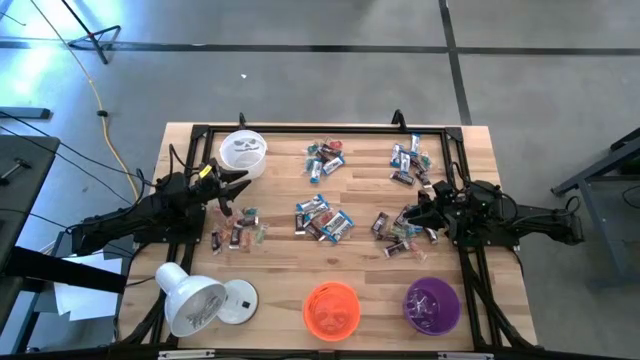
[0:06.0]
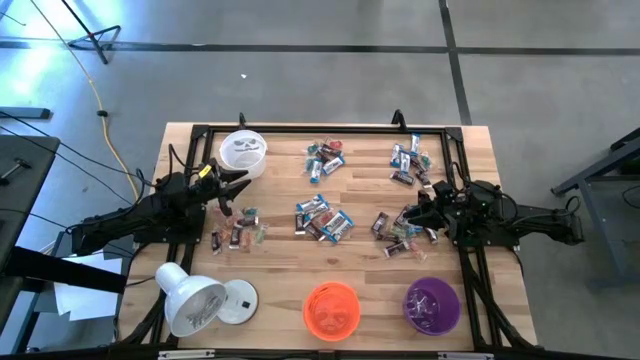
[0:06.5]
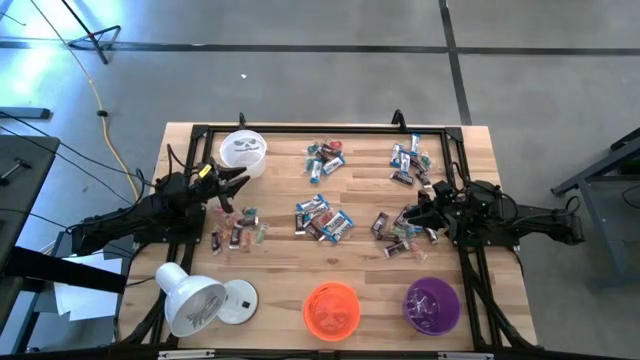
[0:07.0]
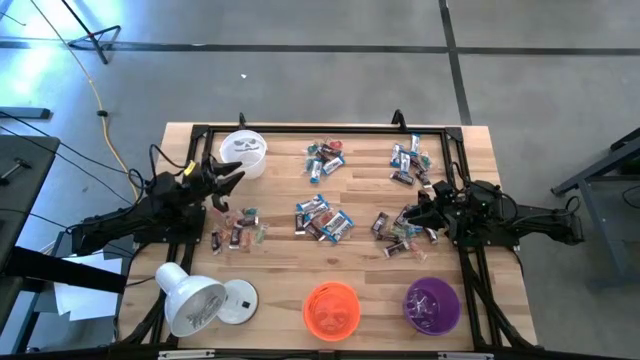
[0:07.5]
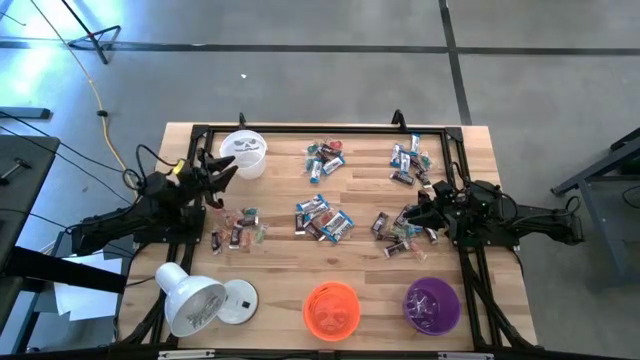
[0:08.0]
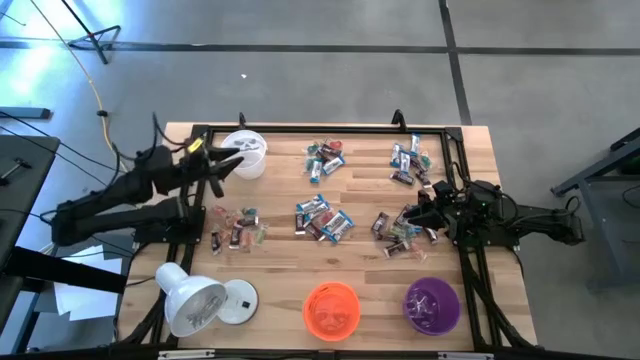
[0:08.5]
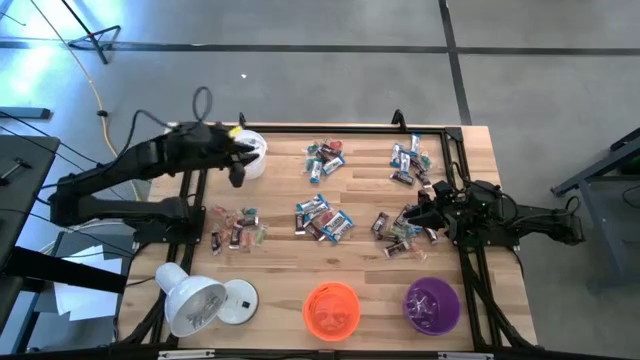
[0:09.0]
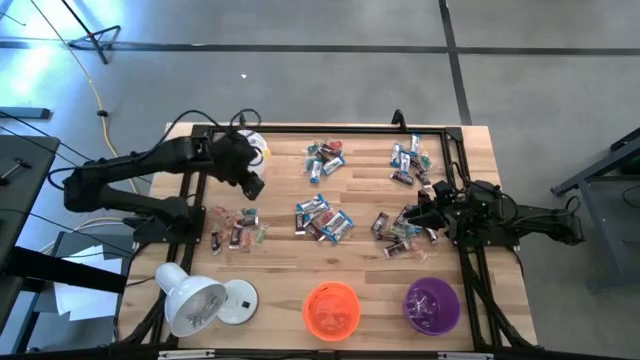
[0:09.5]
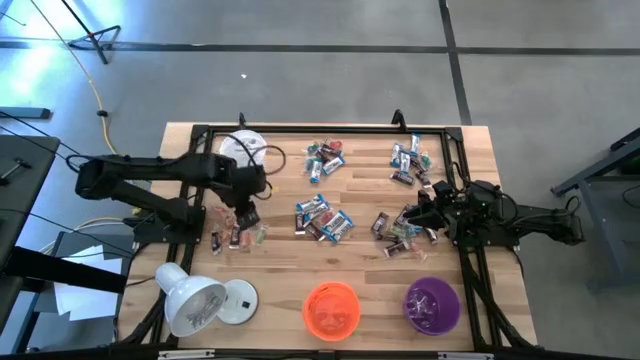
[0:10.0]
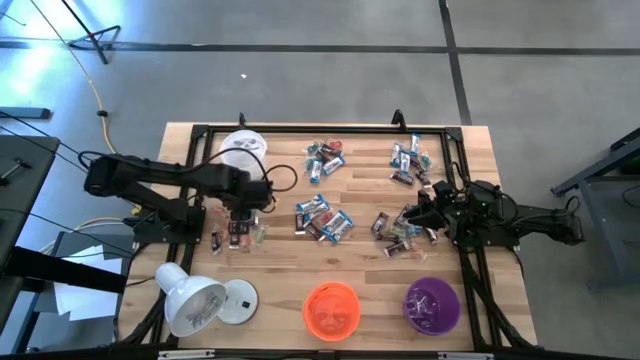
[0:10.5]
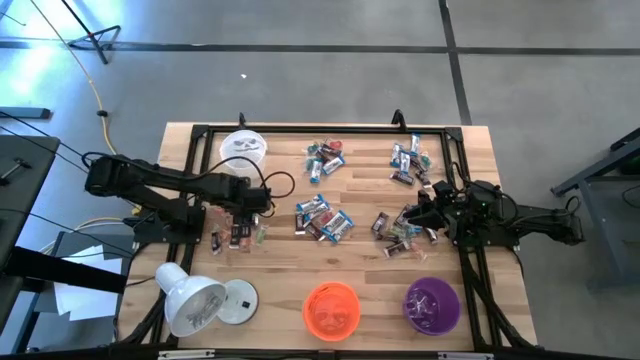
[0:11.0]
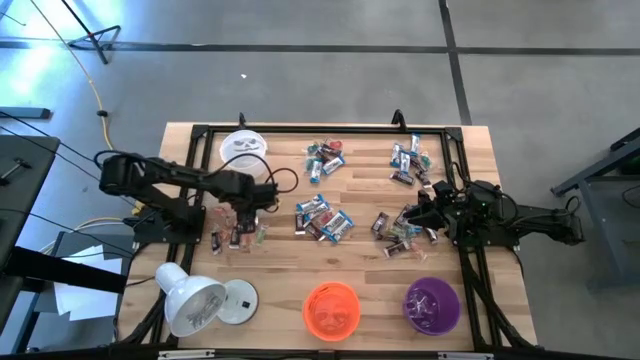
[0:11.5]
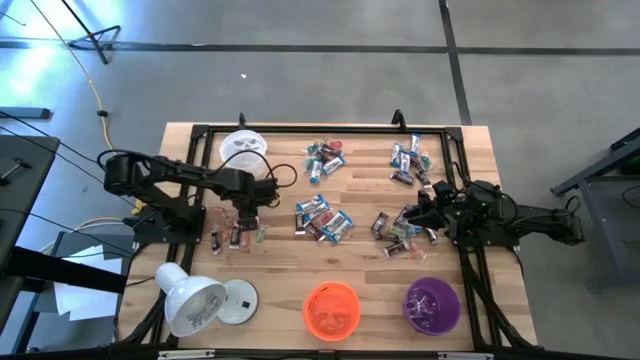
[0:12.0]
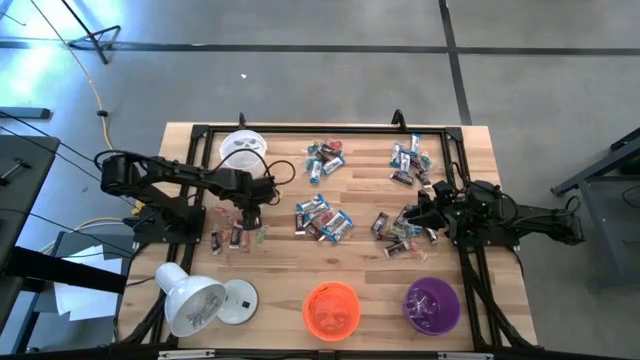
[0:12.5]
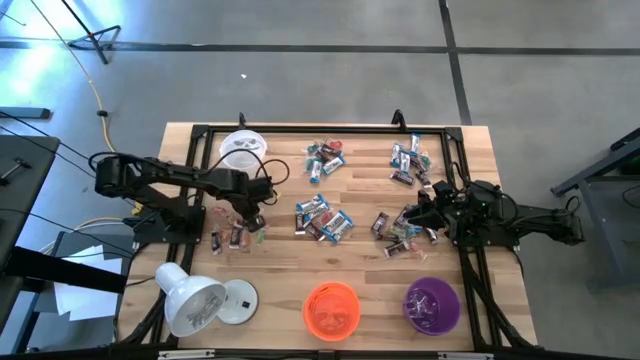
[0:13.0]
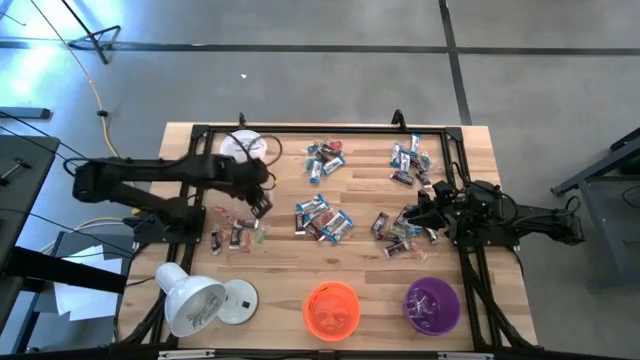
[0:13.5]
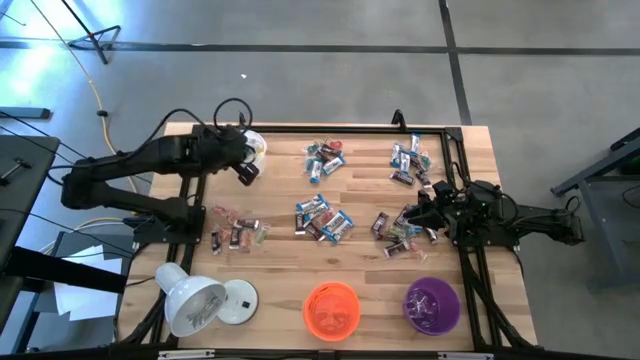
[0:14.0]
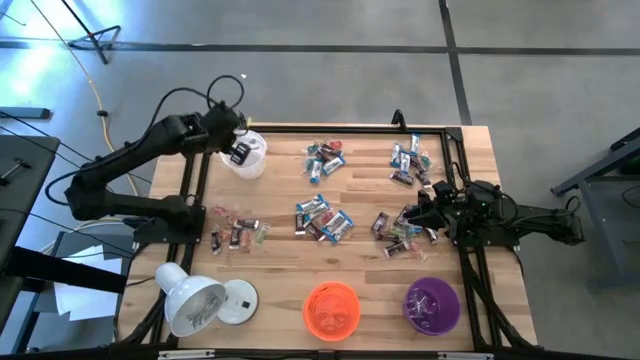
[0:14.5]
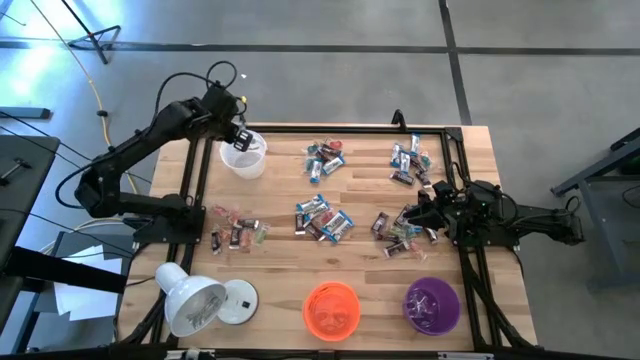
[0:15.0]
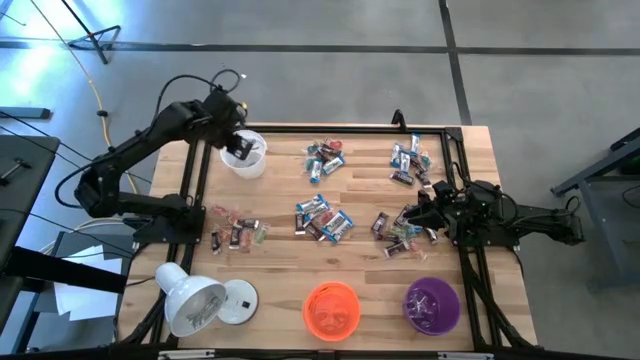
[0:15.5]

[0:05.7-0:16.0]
Task: Organize candy in baskets
Put the blue gummy into the white bucket

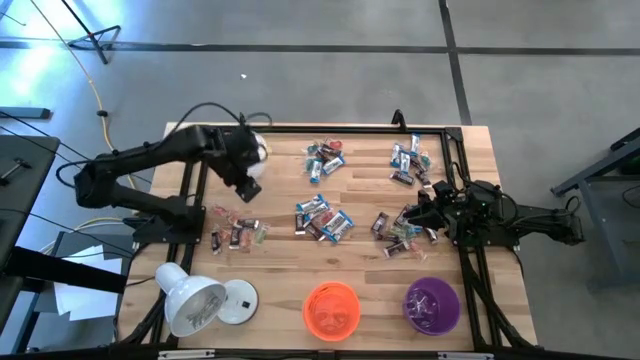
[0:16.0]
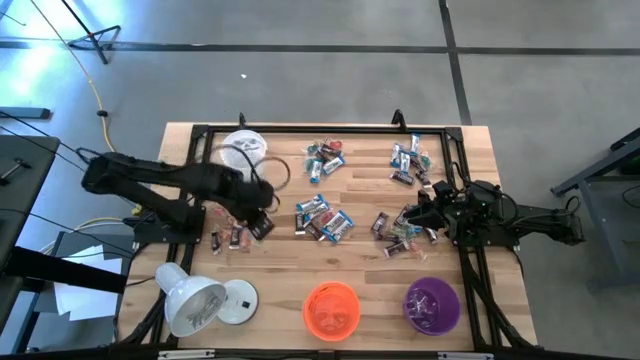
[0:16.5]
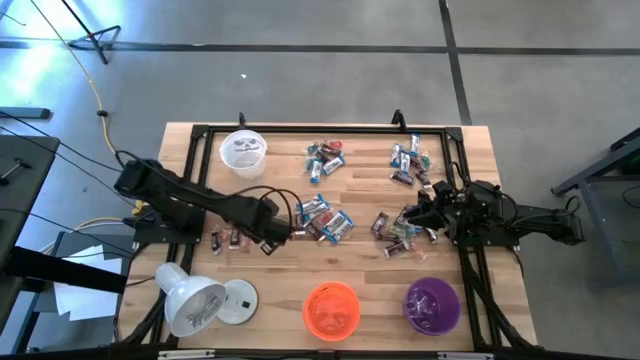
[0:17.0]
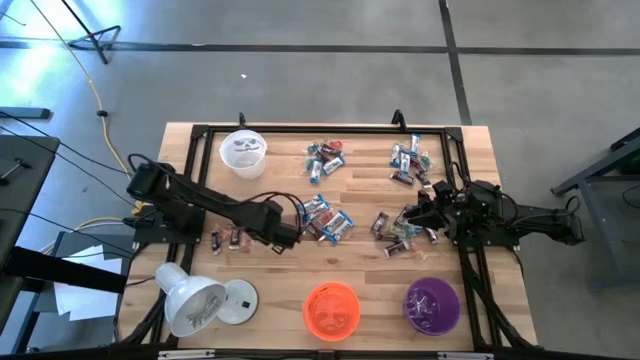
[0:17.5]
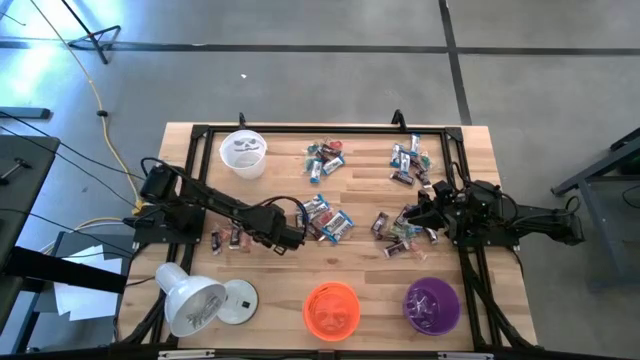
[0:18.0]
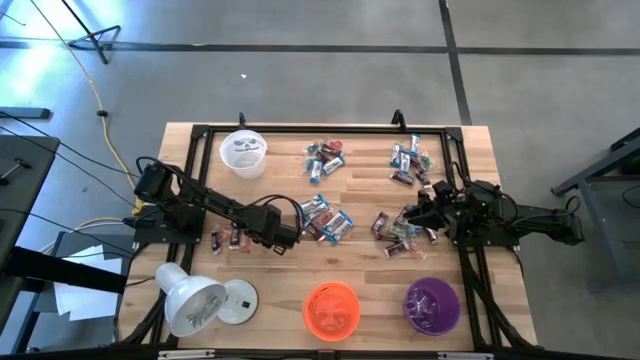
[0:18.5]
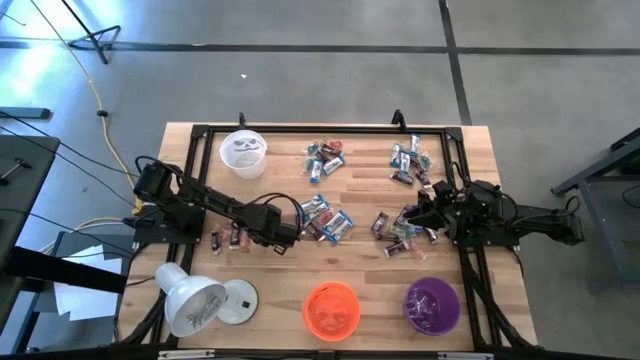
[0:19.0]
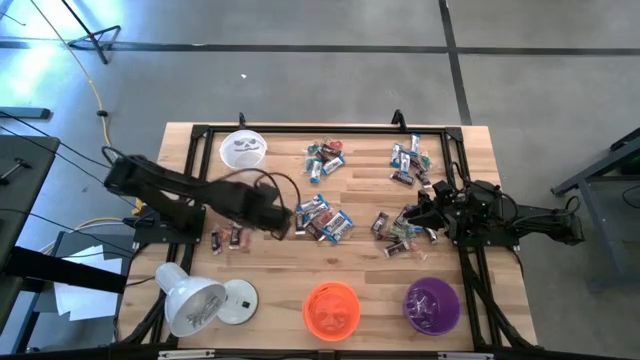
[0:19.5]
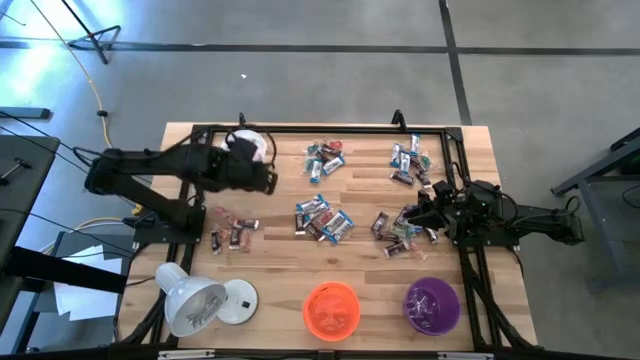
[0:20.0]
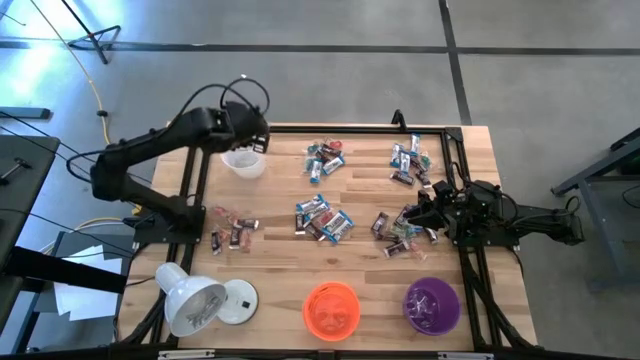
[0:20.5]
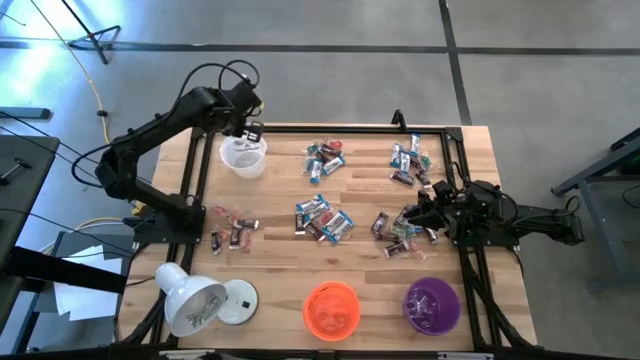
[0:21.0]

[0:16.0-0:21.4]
Put the green gummy into the white bucket

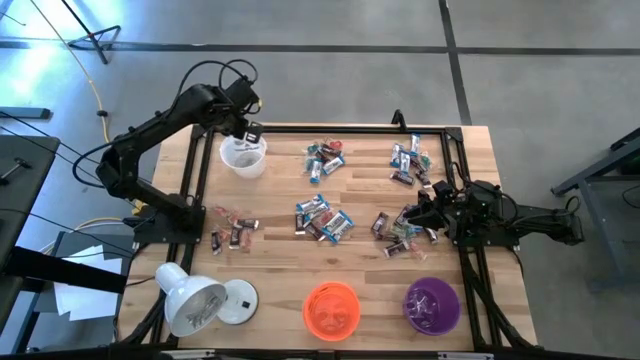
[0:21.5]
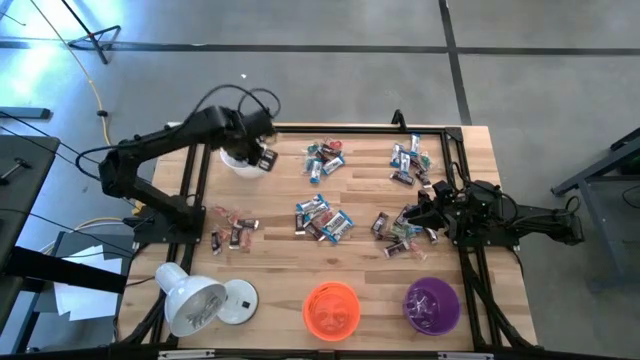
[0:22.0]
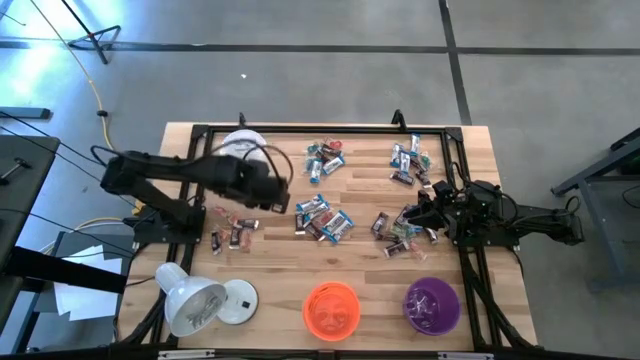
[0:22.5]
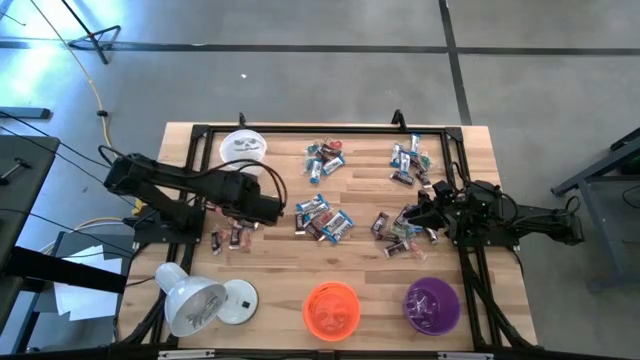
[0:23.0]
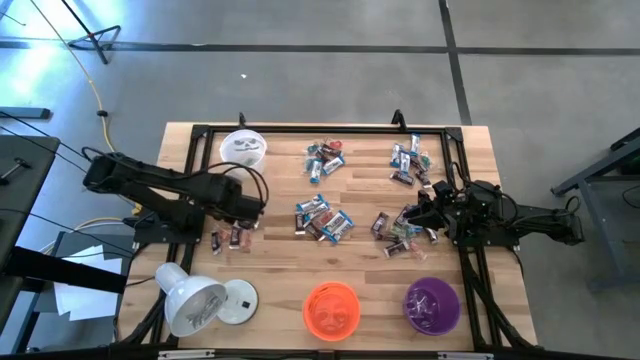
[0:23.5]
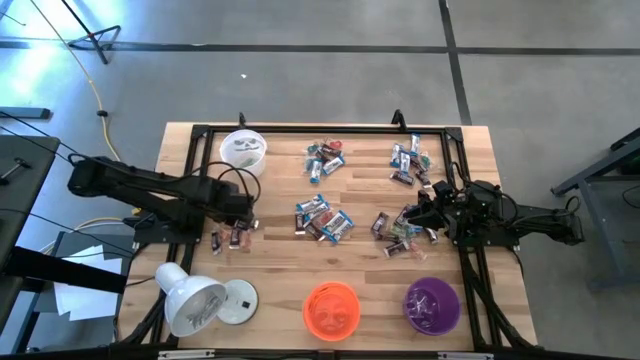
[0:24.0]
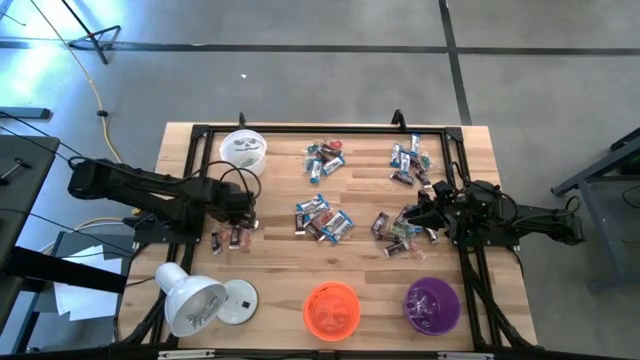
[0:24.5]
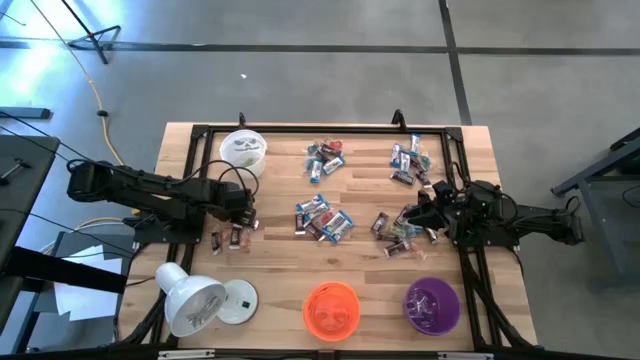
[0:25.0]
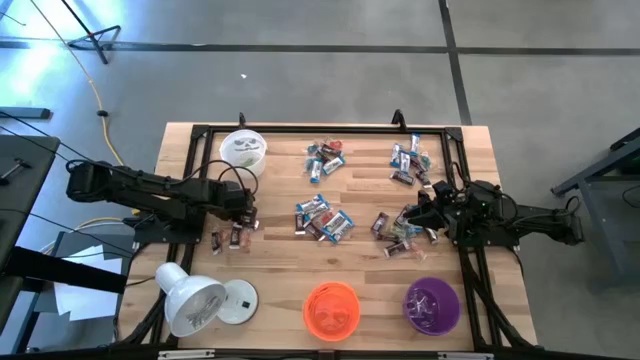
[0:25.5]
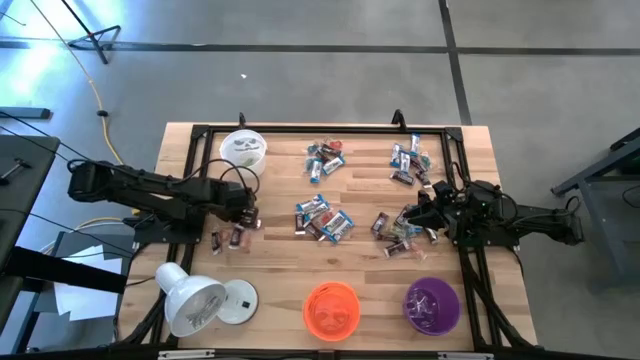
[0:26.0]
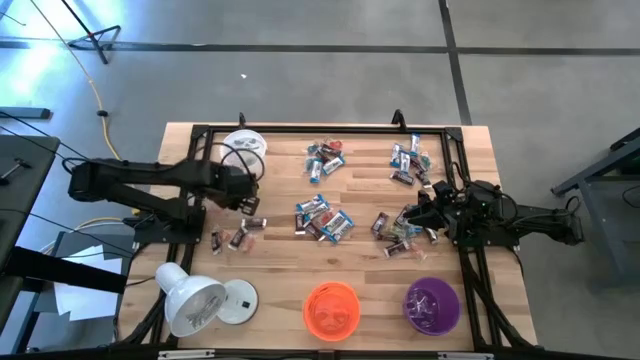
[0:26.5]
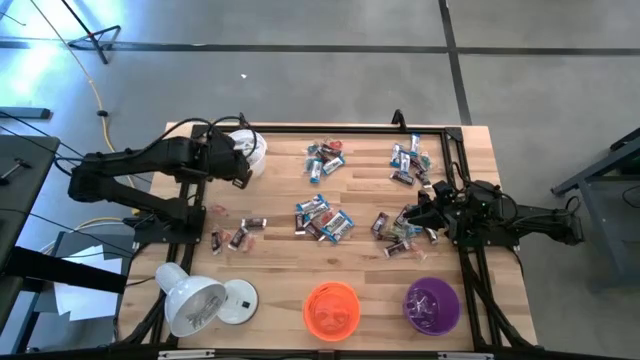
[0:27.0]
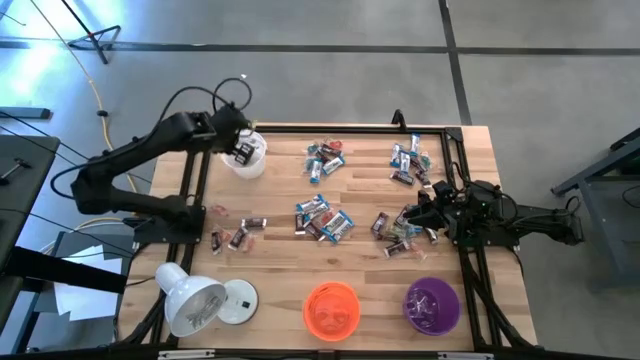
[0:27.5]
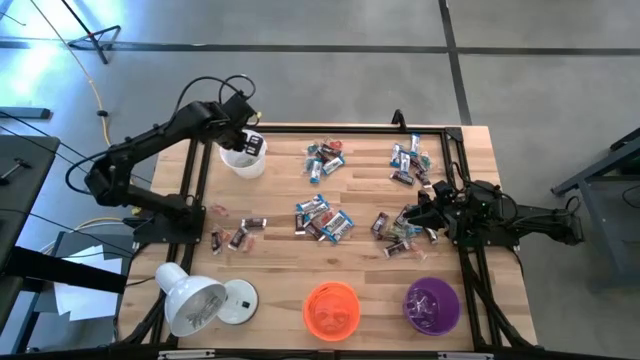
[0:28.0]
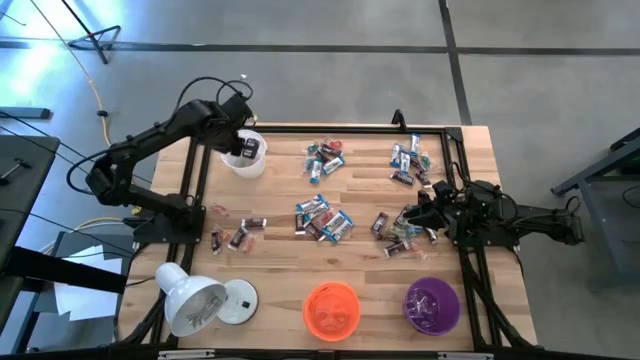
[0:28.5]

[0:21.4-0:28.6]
Put the orange gummy into the white bucket
